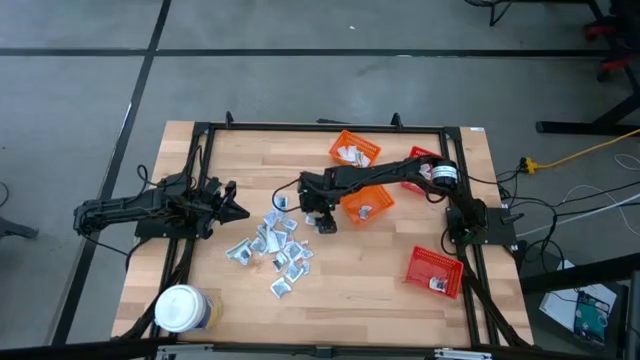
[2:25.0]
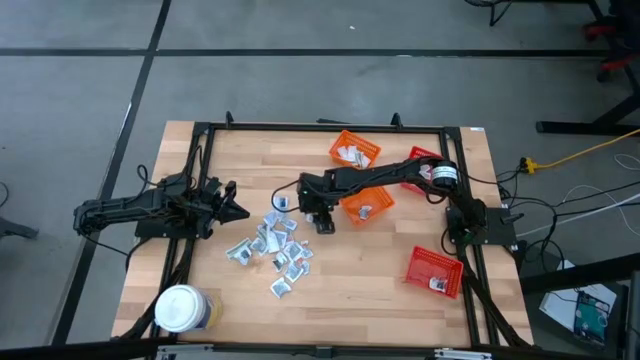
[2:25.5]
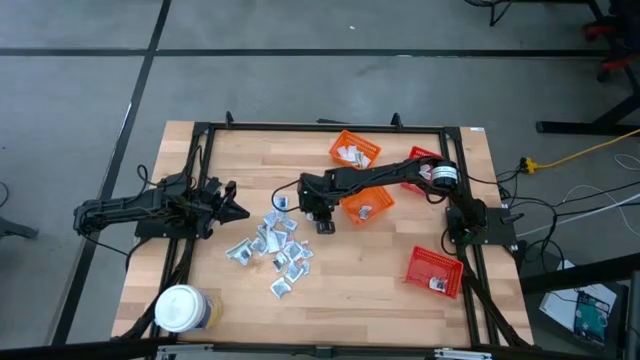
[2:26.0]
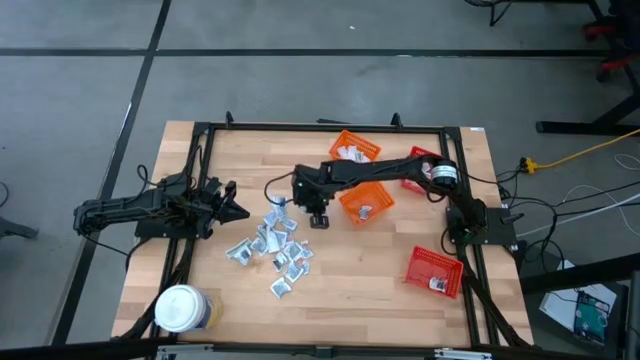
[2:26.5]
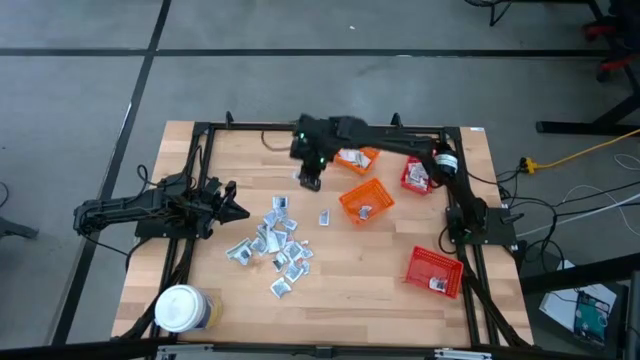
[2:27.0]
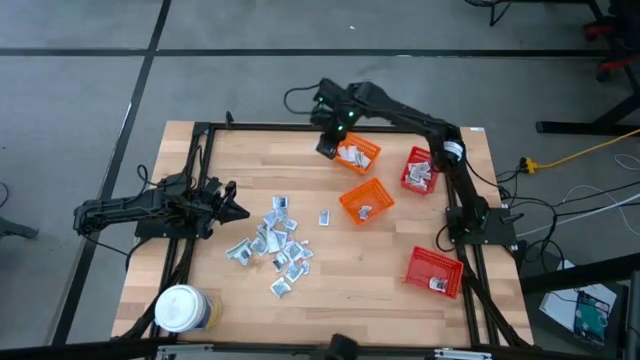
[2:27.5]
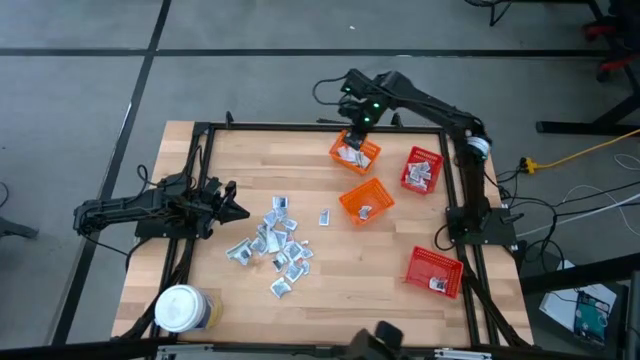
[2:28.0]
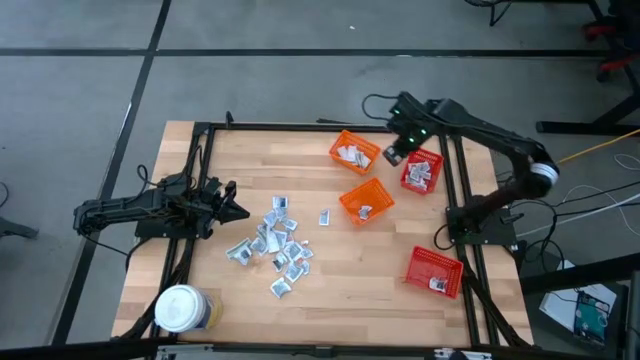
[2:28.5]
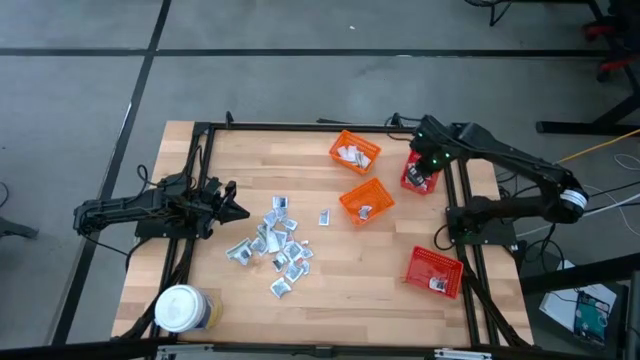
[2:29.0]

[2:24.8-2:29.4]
Task: Pick & Place First Aid Supplies
Put the orange ointment pack into the top red bin

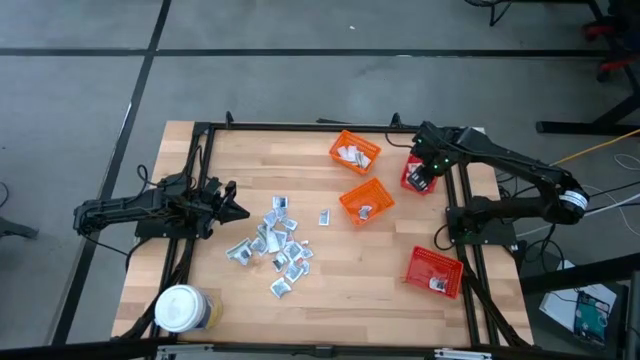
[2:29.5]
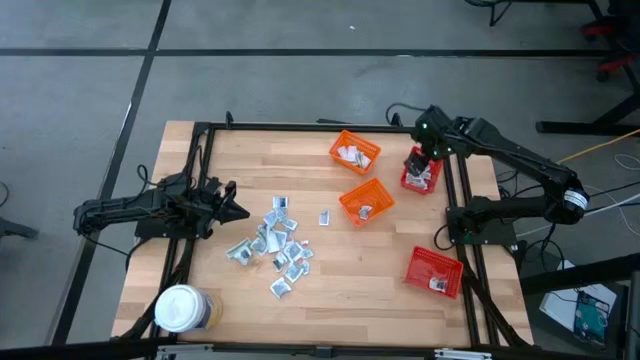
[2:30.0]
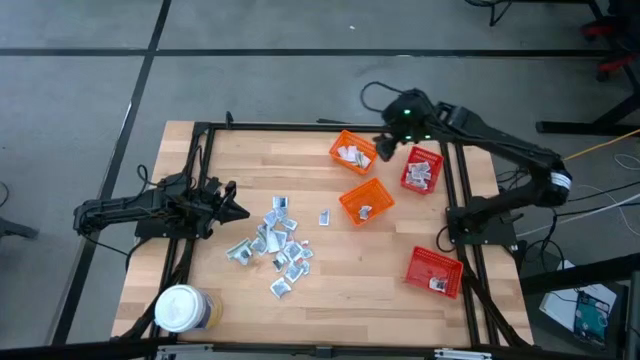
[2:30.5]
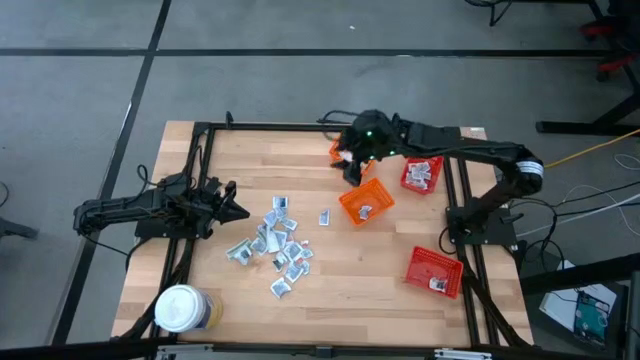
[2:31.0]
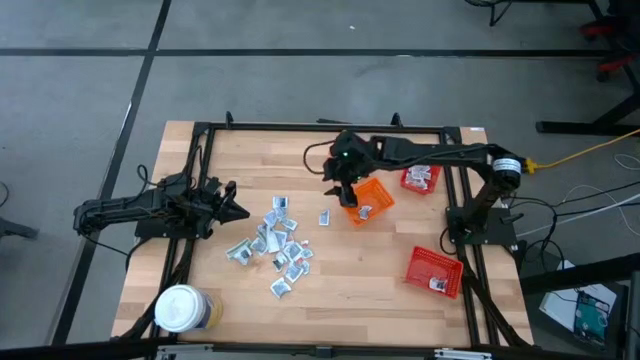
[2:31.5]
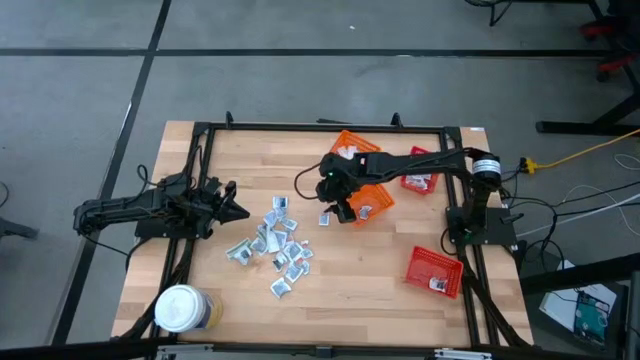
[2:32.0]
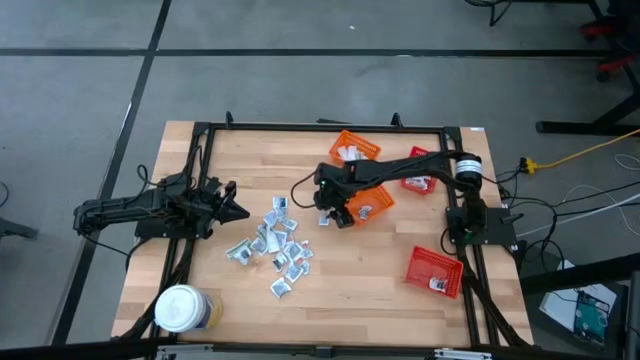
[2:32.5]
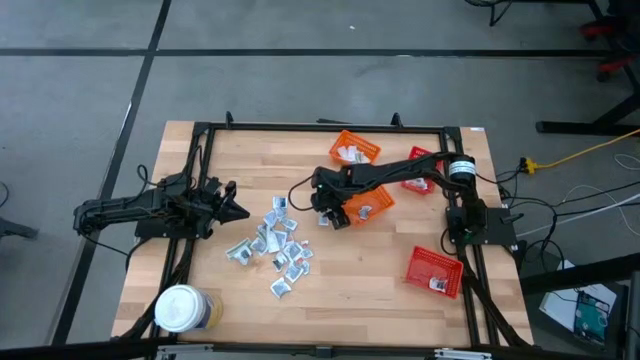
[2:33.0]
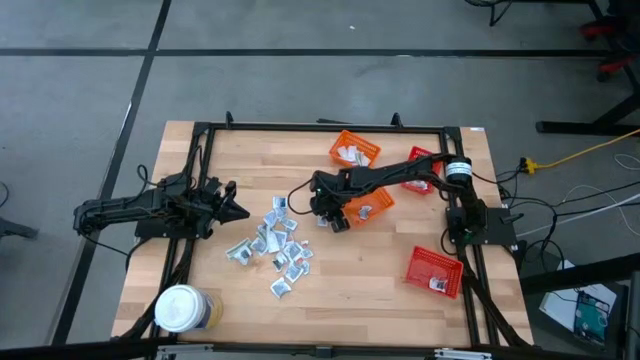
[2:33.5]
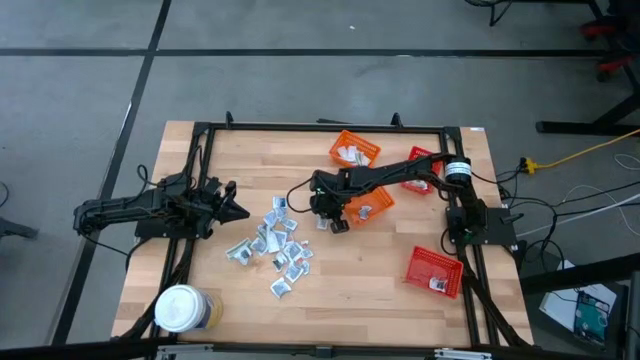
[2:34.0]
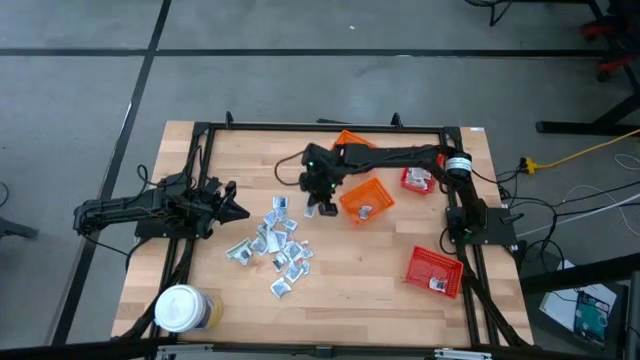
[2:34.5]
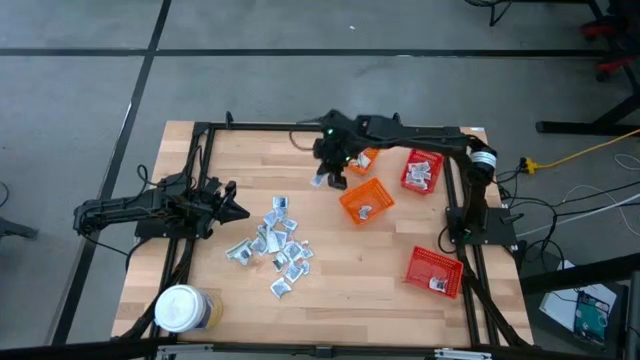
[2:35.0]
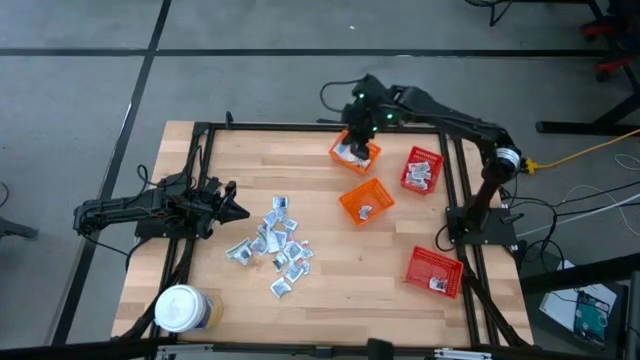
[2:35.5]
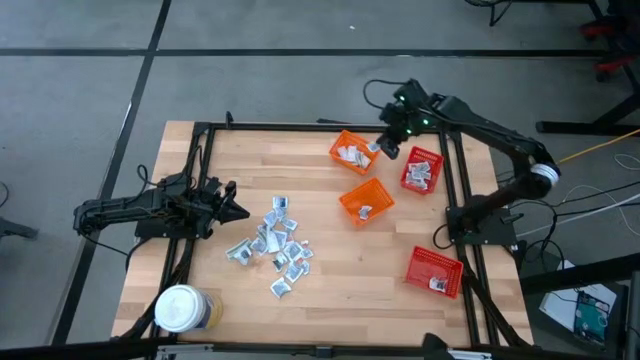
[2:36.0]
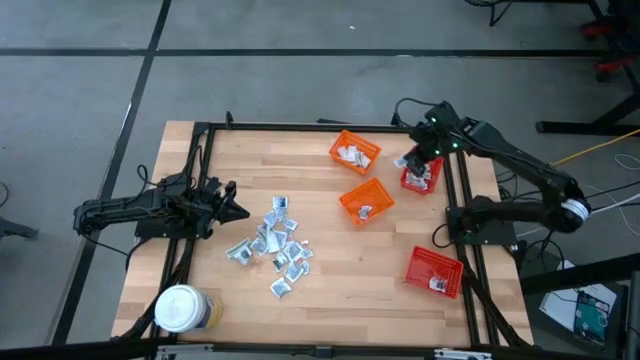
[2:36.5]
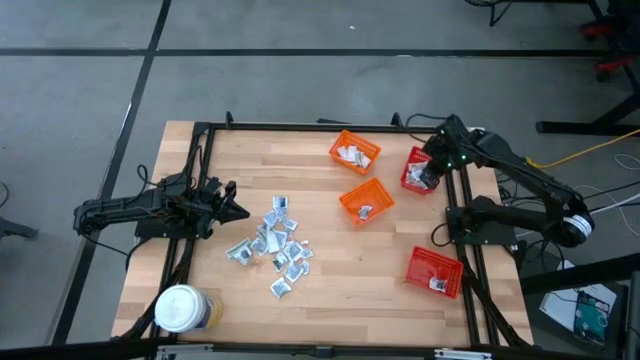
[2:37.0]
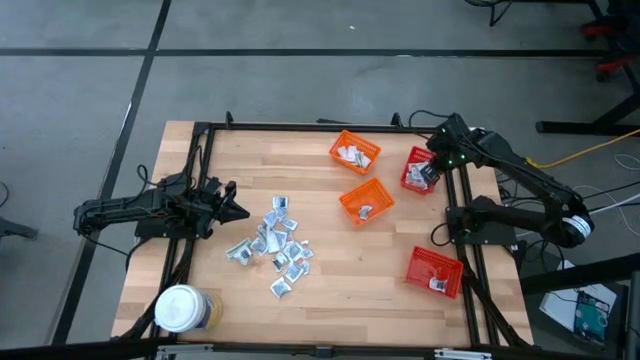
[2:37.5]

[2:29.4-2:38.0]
Put the orange ointment pack into the top red bin

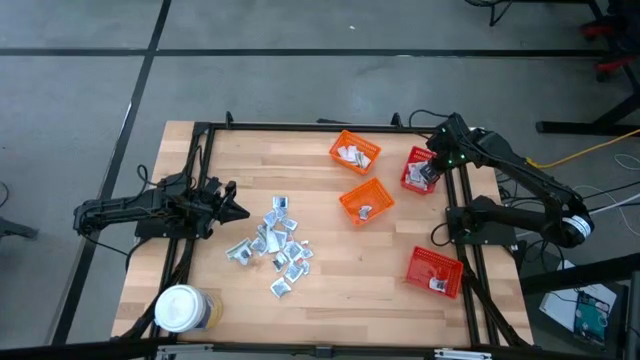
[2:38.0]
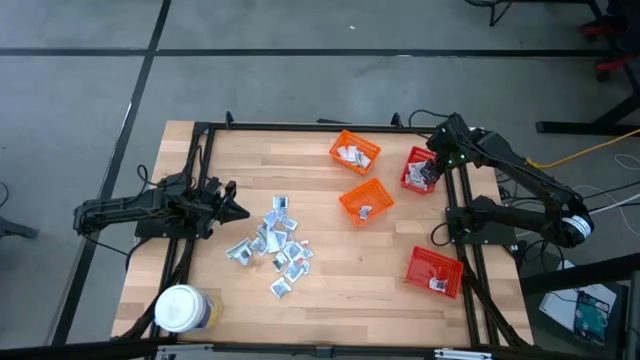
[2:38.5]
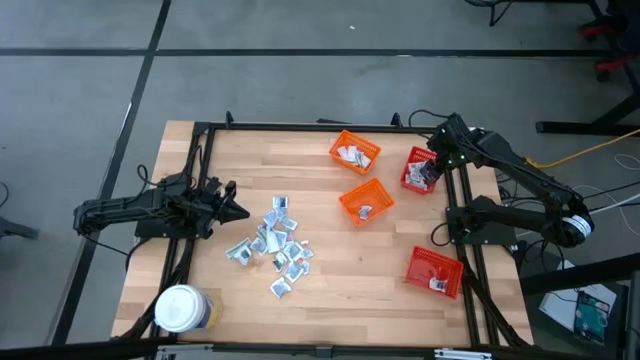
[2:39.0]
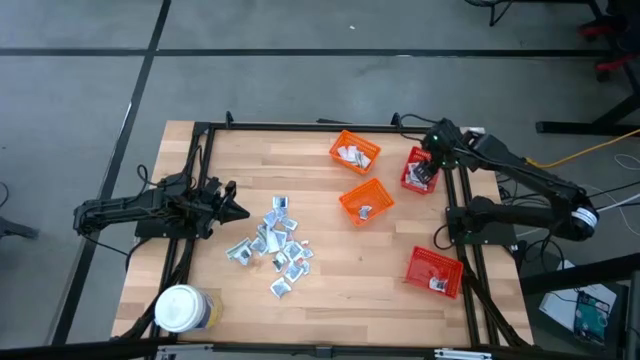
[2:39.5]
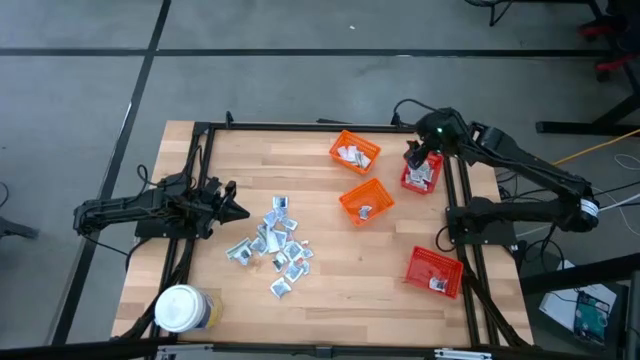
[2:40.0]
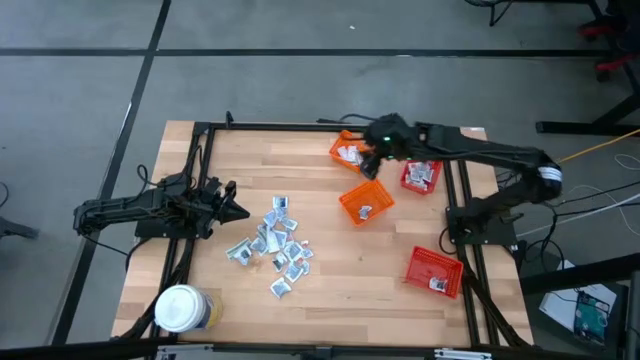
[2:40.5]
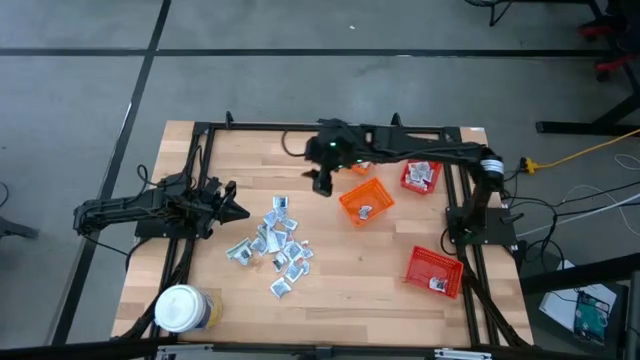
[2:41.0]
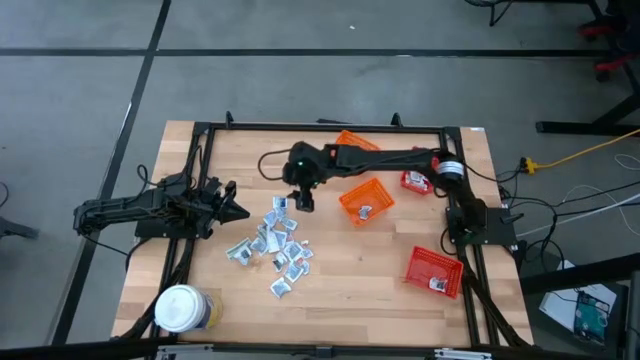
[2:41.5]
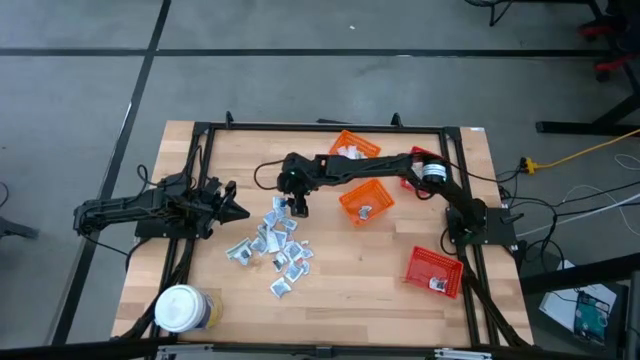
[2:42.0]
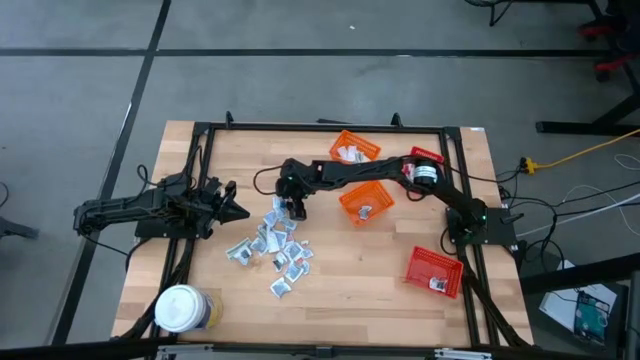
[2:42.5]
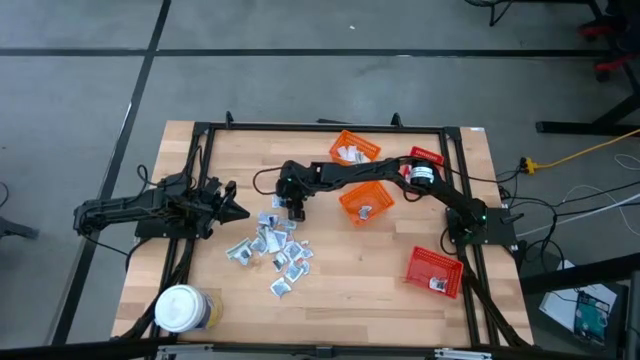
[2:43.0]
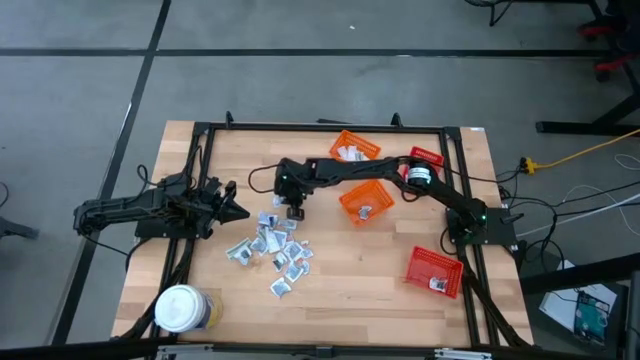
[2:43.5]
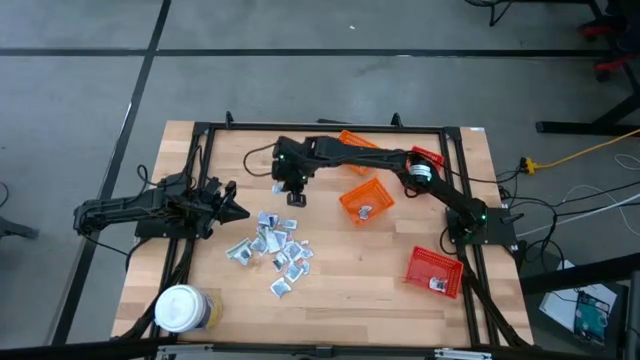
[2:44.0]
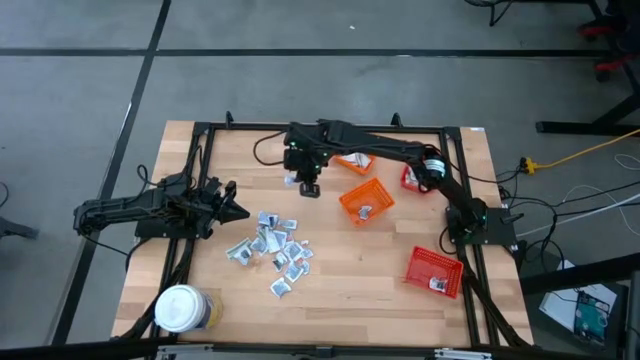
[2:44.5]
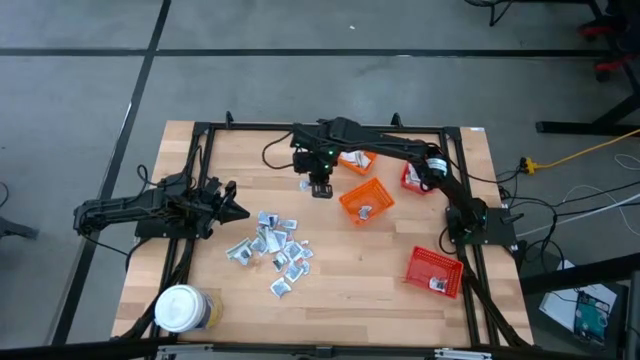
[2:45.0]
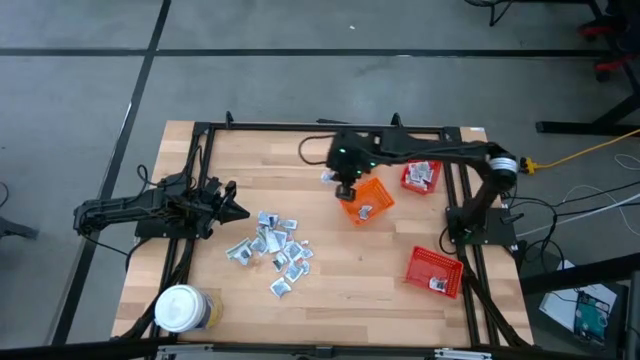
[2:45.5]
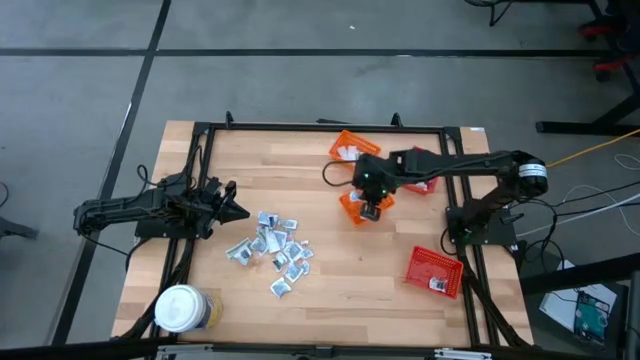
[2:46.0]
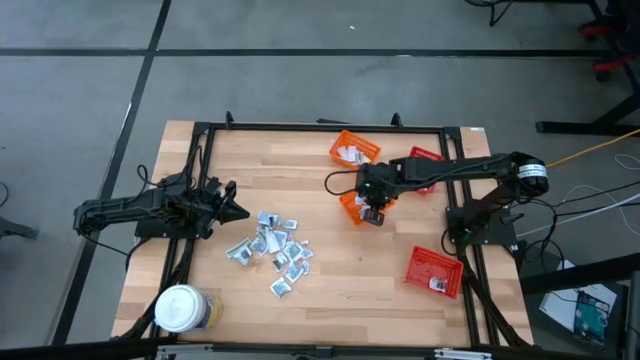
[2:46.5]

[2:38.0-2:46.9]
Put the blue alcohol pad into the bottom orange bin
